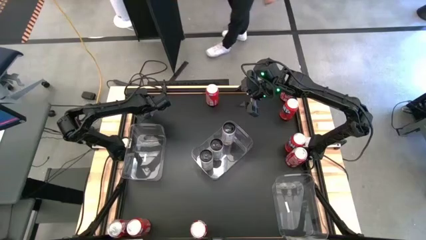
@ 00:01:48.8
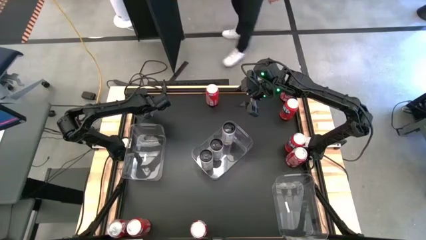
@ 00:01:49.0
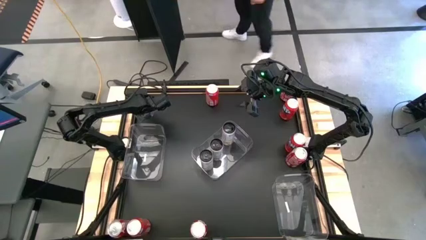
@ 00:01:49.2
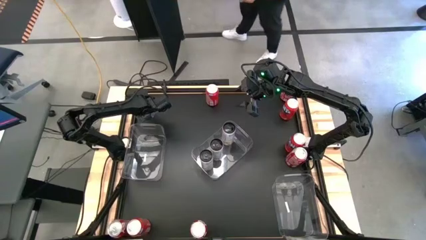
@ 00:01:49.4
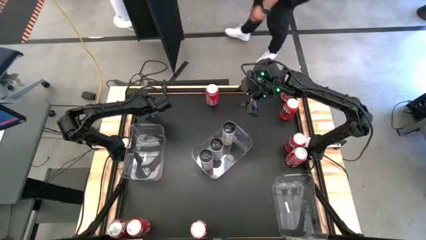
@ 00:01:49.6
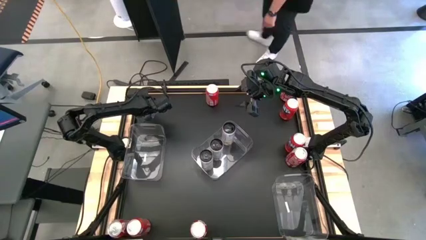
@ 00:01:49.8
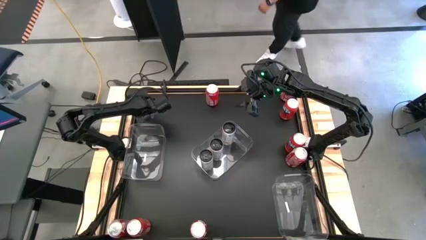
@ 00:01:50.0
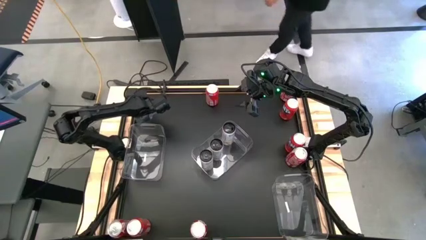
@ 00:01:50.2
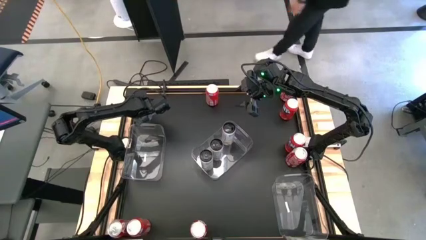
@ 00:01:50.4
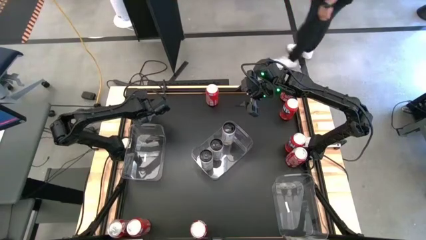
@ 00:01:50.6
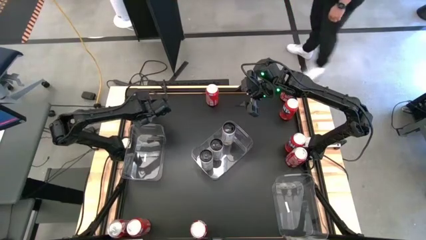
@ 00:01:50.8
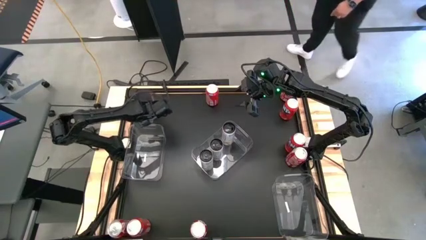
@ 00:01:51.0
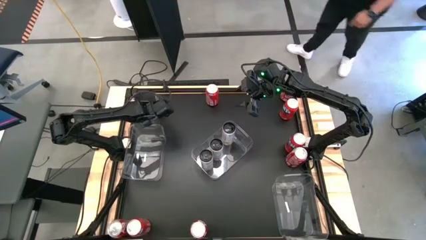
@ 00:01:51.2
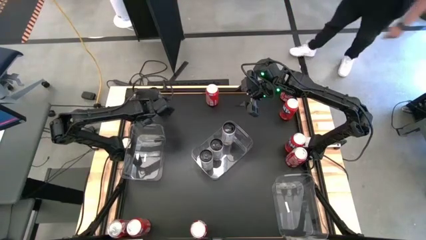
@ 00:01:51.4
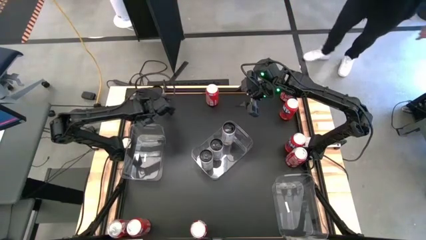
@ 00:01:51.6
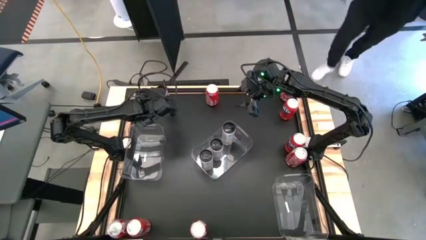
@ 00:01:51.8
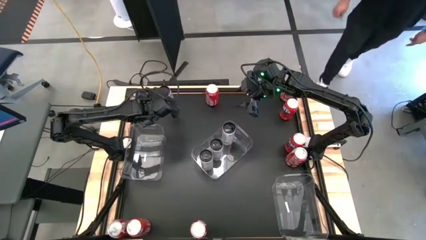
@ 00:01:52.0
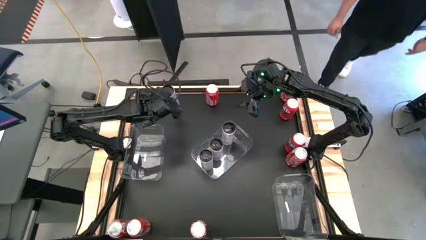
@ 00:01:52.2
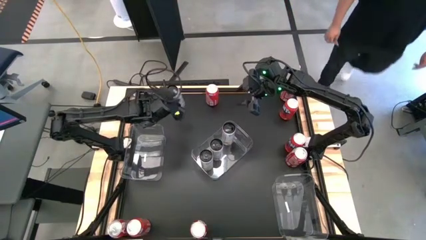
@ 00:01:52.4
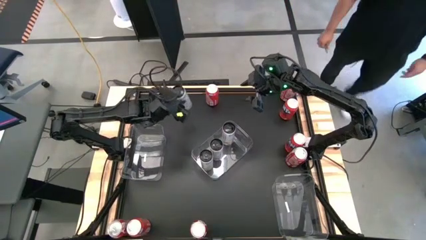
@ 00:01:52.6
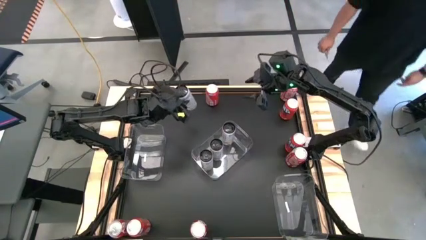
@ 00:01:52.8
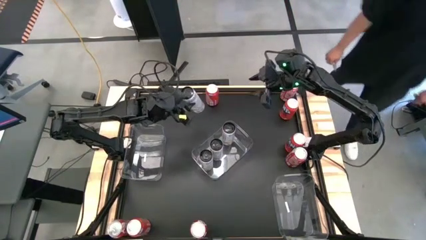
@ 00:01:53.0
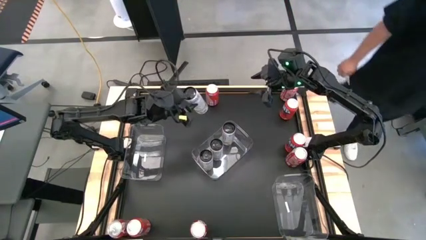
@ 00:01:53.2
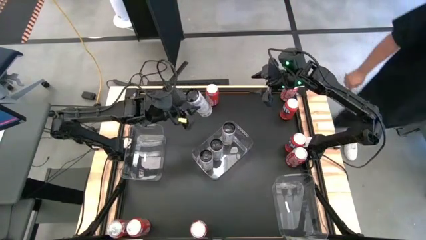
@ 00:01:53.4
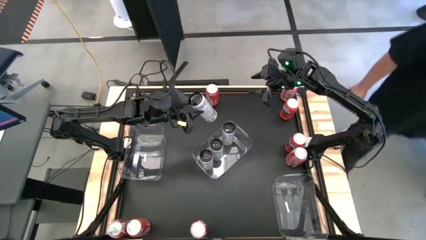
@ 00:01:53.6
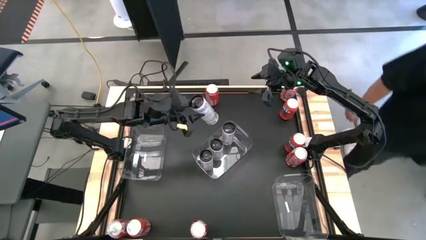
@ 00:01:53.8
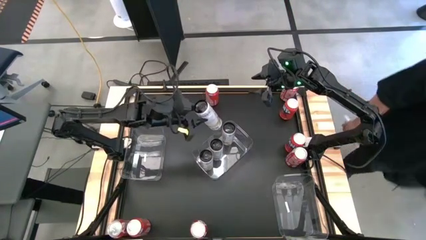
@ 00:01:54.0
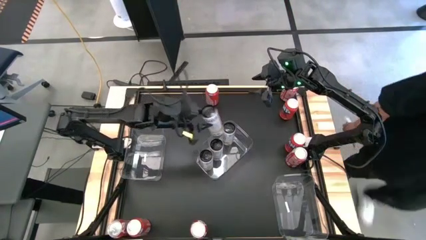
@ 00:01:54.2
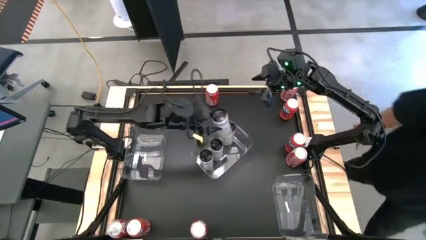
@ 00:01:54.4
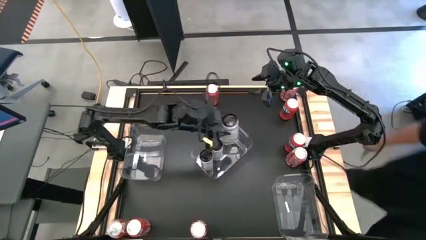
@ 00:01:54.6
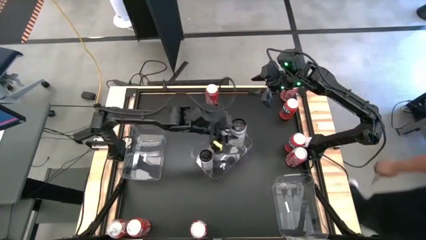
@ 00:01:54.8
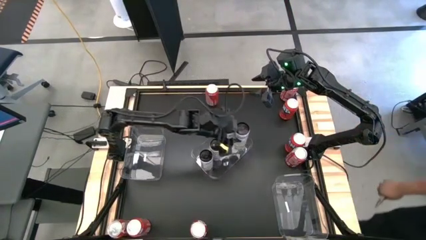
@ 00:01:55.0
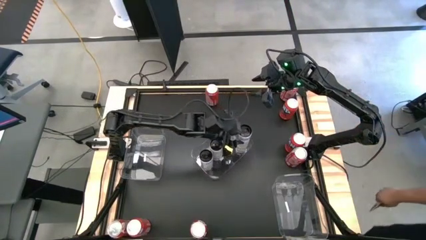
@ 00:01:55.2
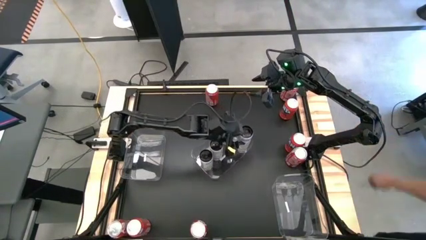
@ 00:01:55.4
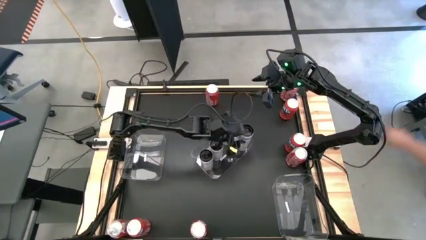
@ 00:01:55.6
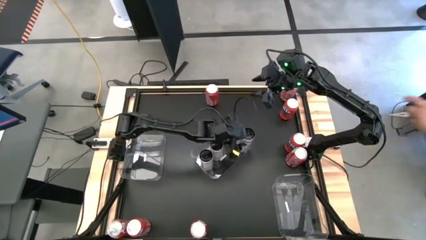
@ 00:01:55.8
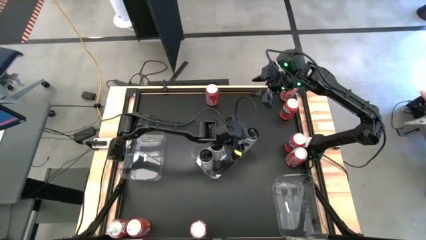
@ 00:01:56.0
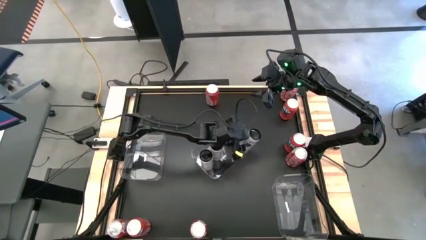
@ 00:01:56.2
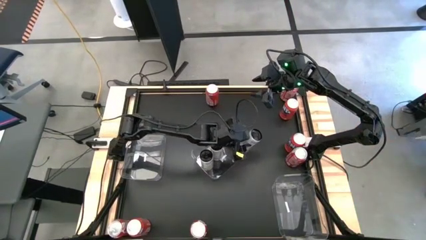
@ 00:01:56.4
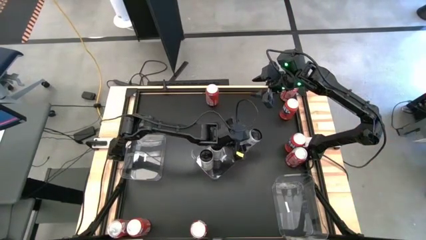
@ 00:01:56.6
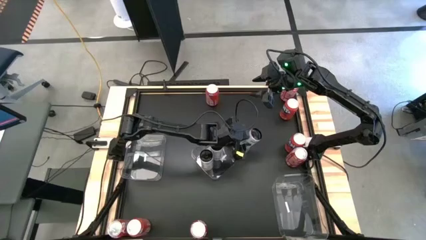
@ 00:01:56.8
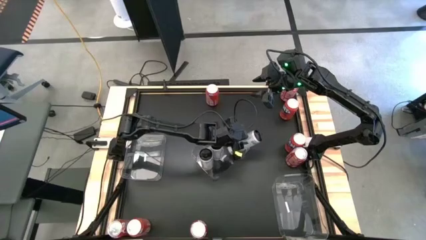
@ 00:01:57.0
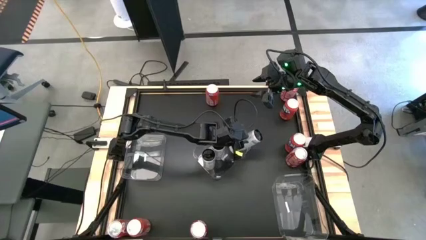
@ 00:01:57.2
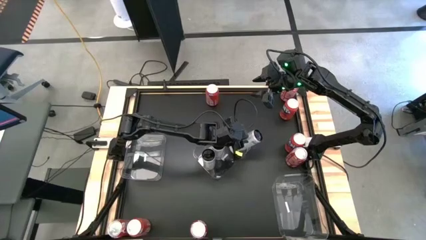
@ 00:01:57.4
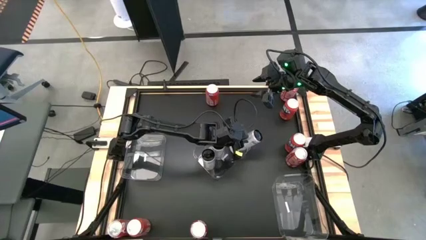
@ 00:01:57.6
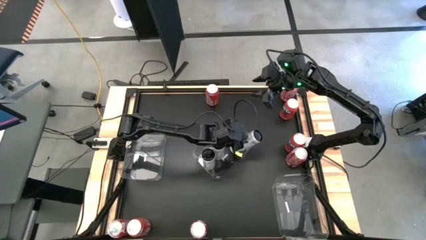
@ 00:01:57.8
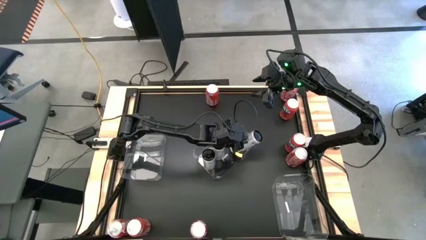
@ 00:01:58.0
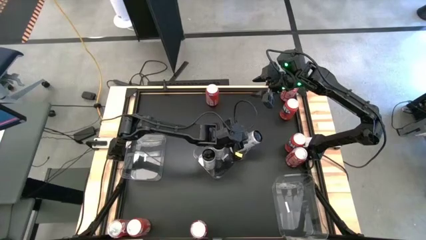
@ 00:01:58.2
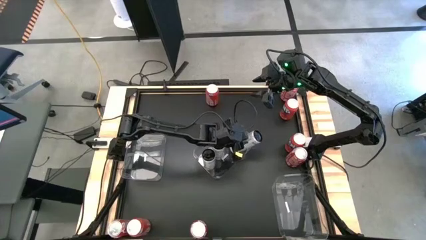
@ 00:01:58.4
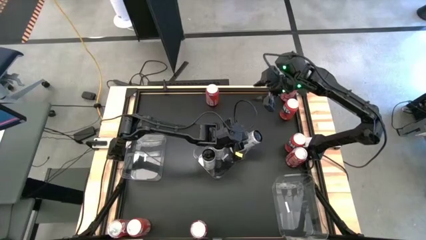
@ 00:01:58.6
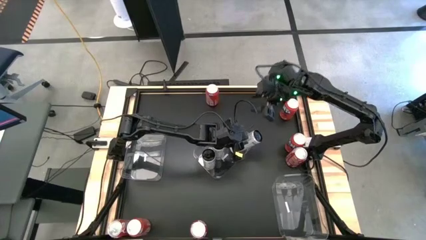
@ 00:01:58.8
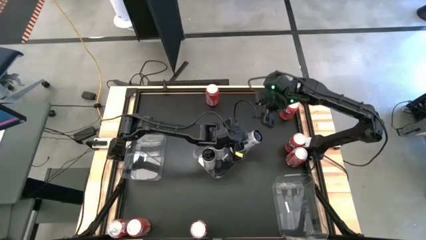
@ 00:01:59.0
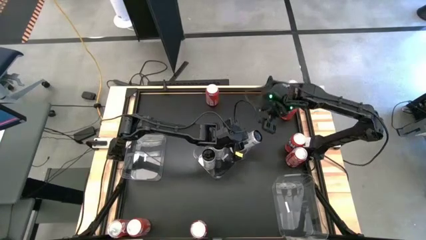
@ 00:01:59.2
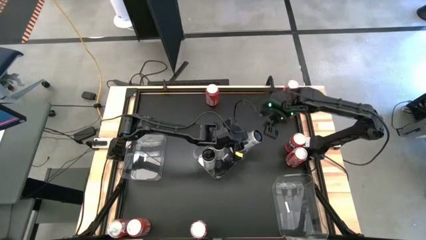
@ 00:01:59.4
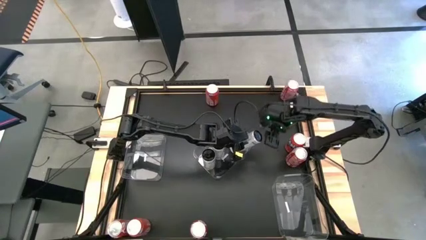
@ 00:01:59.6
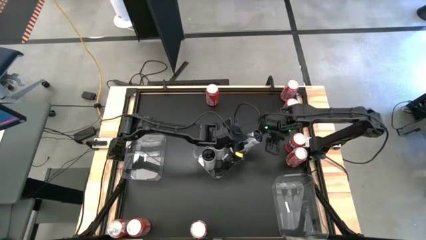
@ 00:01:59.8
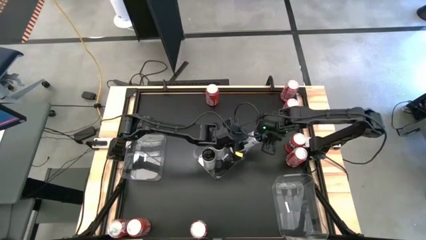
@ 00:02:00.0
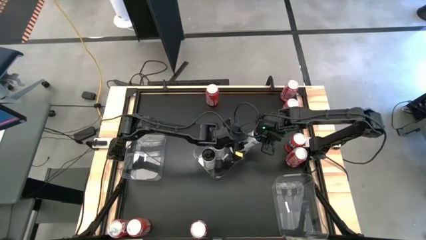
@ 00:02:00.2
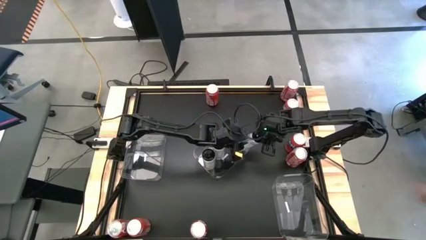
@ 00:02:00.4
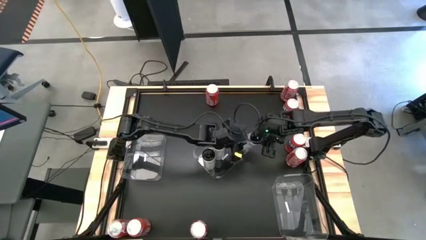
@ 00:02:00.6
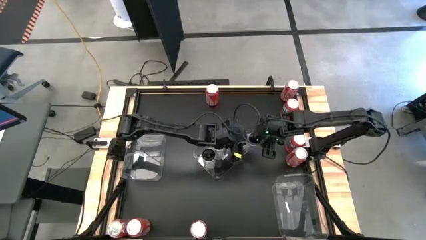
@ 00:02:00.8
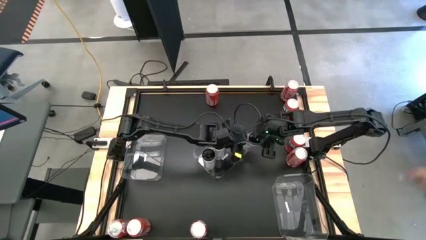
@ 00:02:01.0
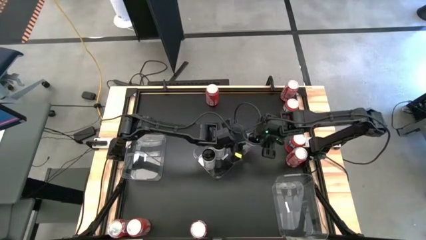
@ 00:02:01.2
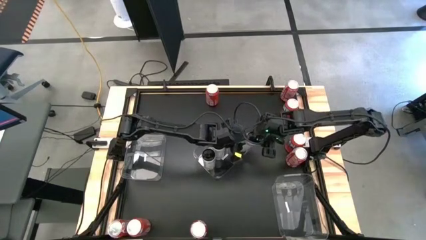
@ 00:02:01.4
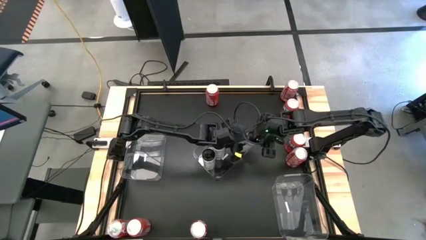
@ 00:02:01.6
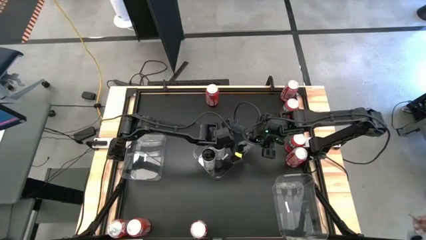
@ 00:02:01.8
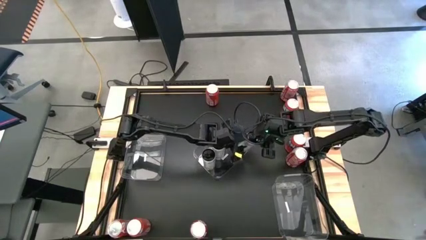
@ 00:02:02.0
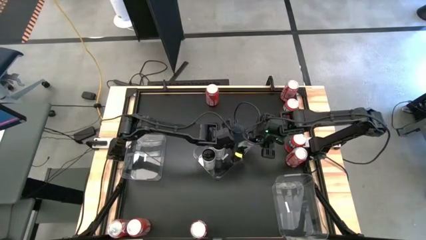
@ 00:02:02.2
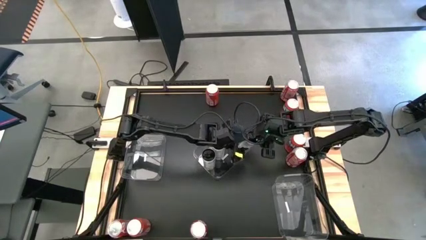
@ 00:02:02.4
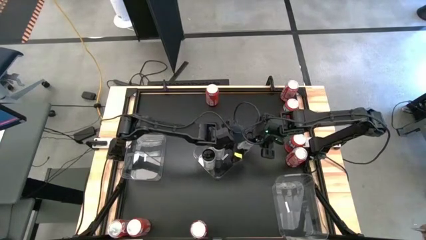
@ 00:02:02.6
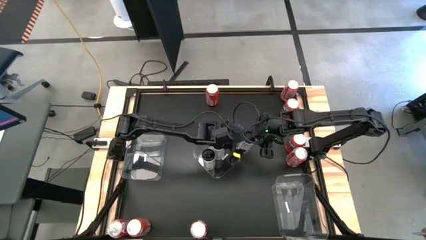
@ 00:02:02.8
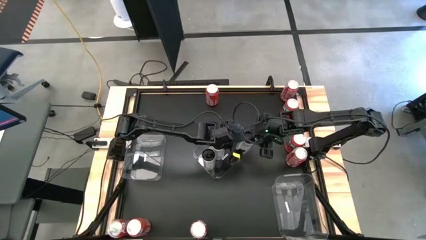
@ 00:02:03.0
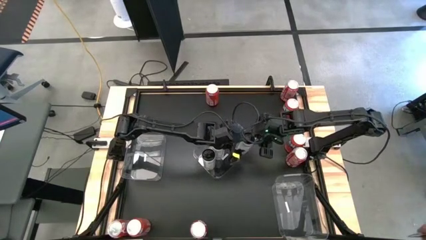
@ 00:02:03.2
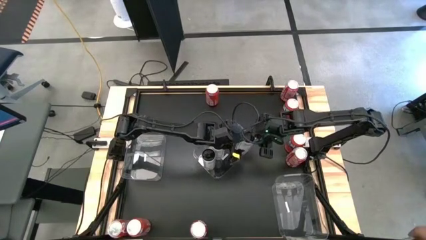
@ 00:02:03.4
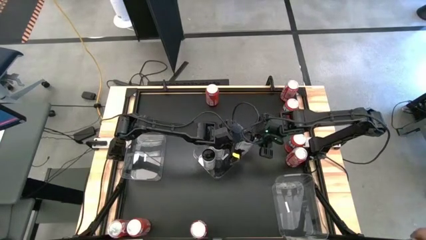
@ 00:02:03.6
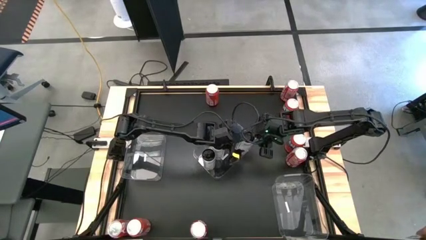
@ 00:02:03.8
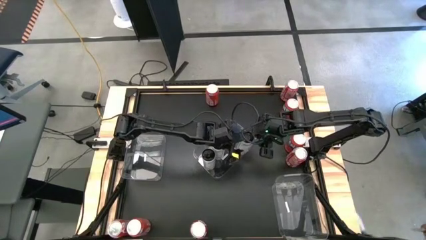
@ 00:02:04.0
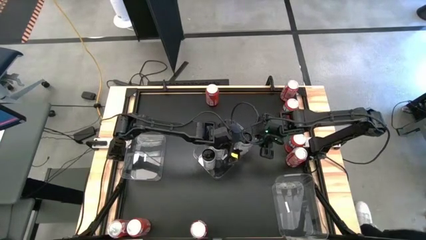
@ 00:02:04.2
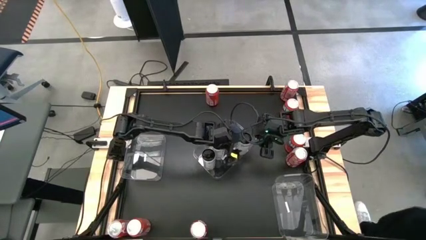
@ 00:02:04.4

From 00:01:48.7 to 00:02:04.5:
Task: Sort soda cans
Put the white soda can into the middle transparent bin
